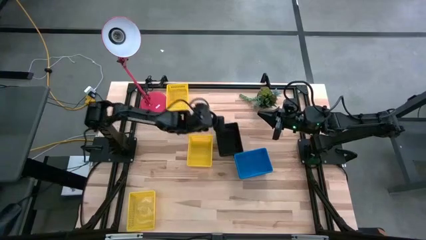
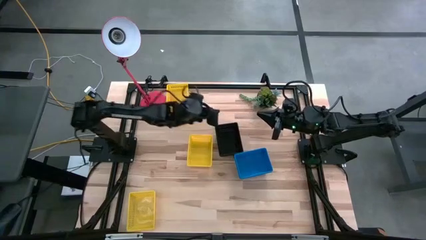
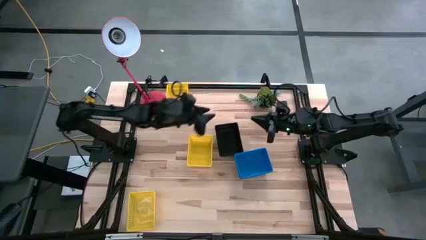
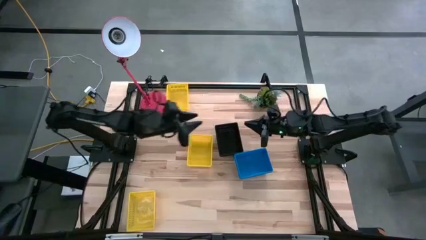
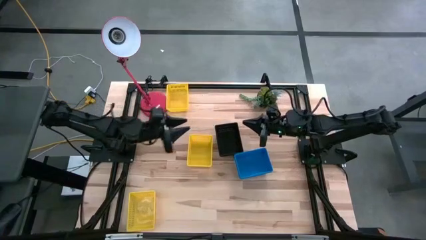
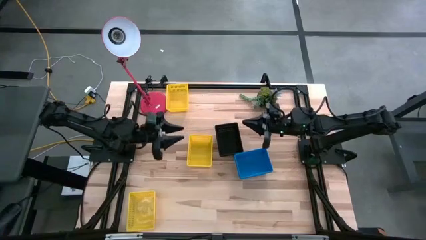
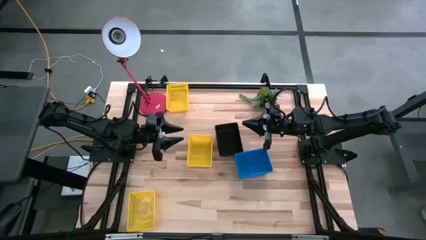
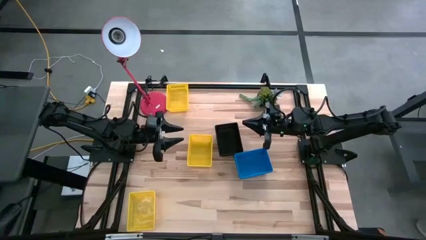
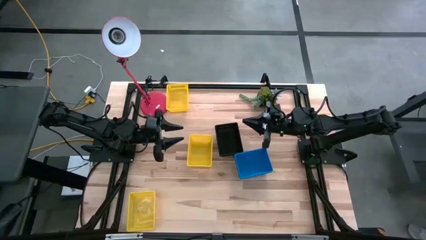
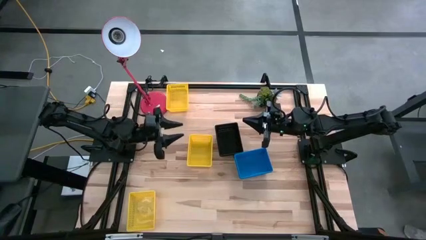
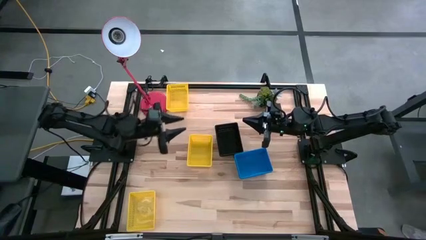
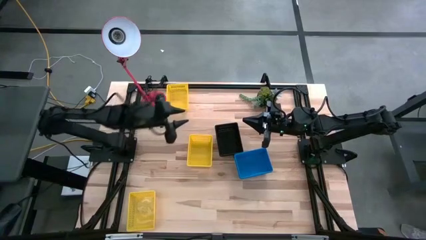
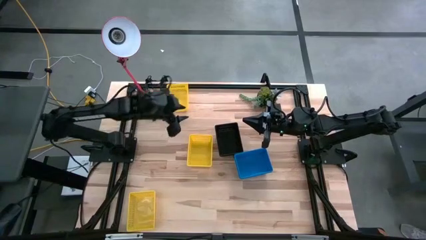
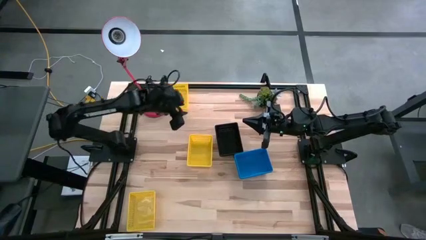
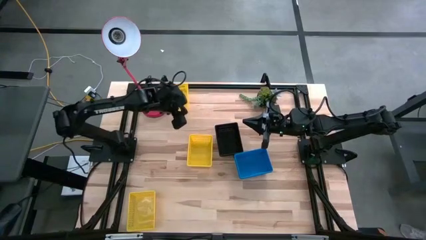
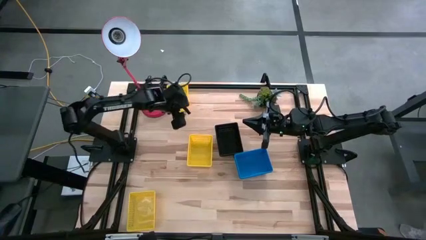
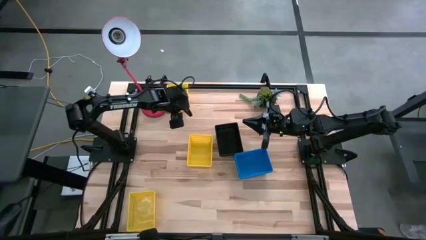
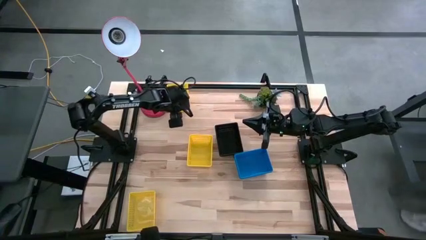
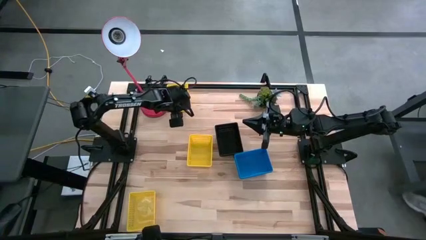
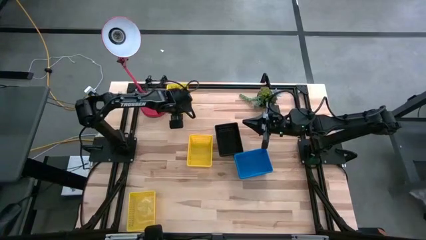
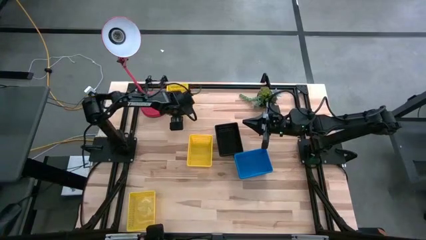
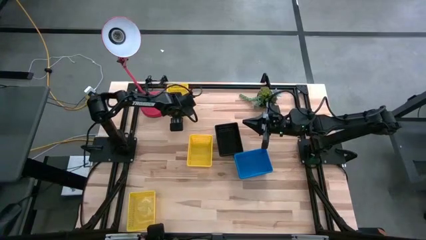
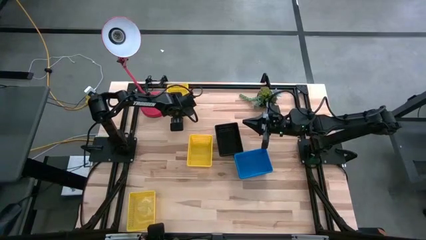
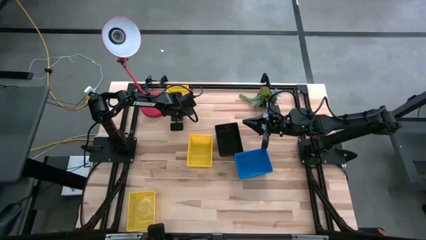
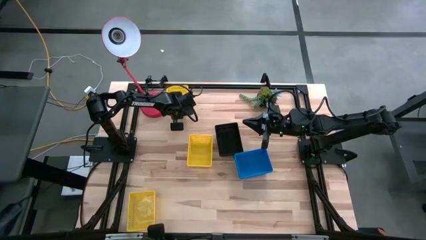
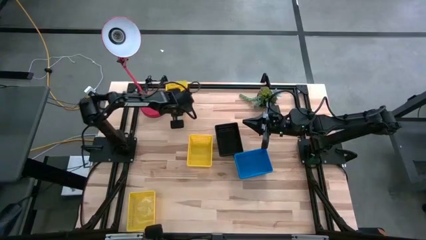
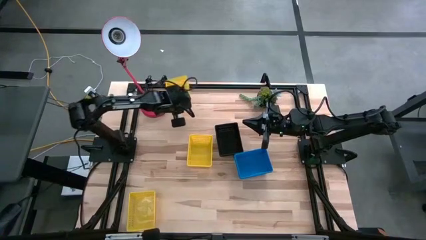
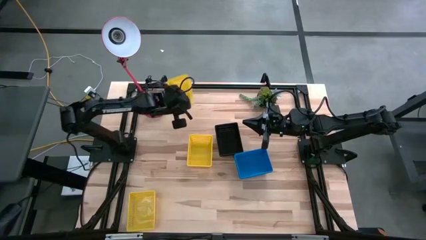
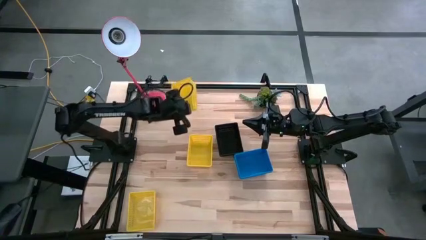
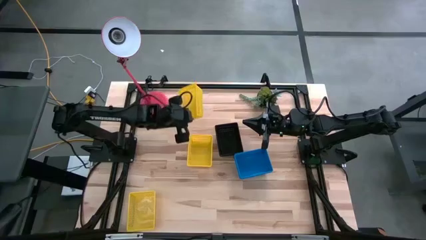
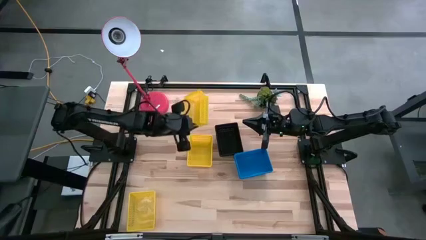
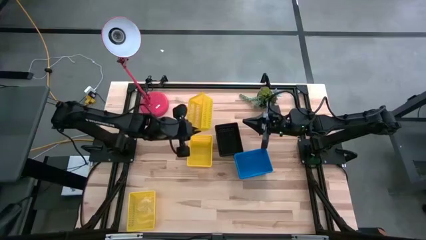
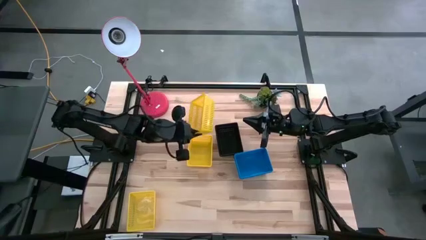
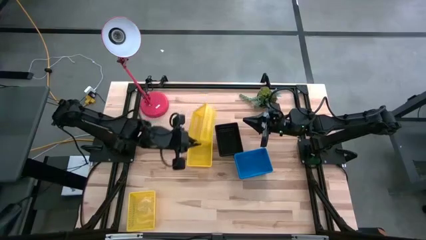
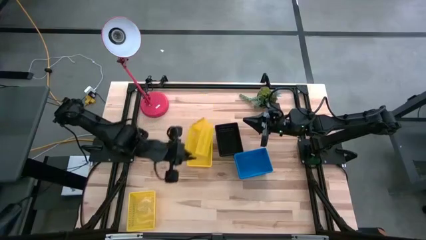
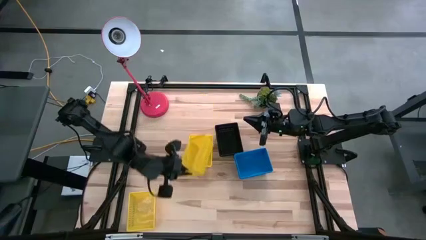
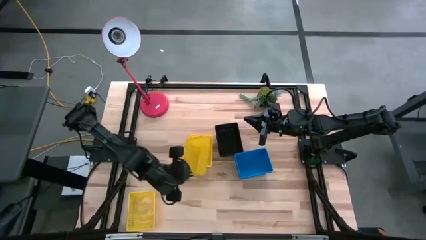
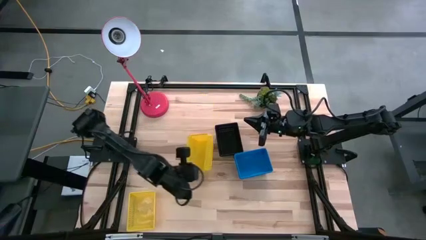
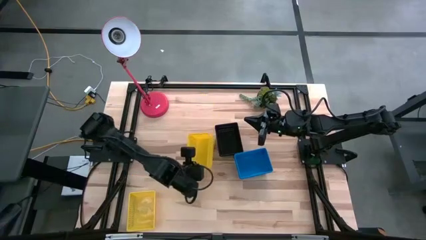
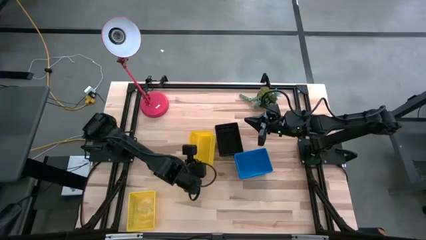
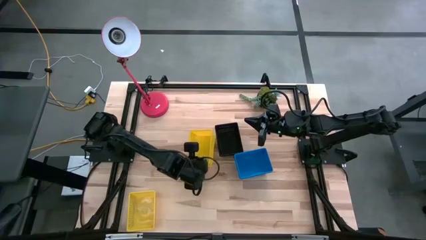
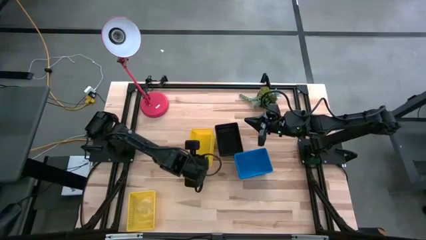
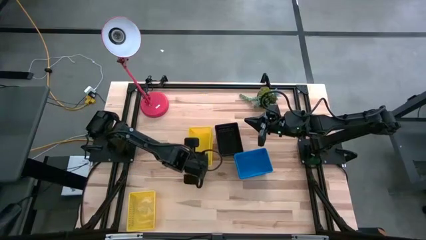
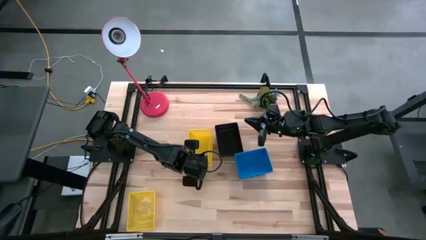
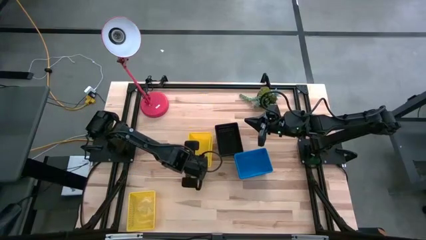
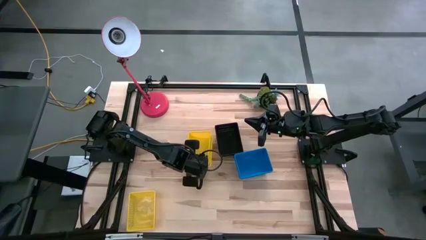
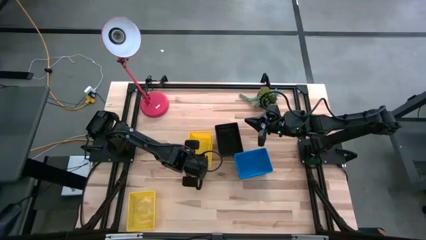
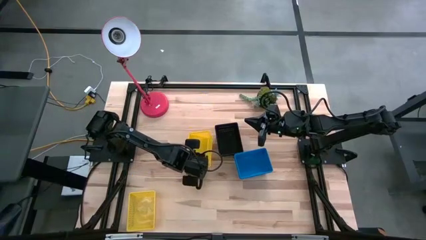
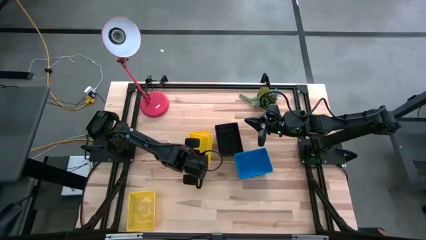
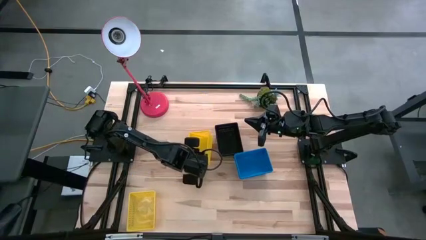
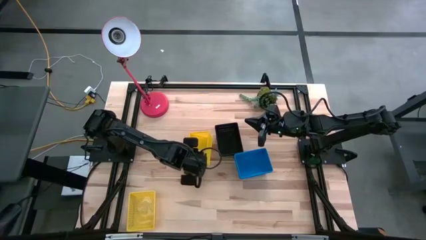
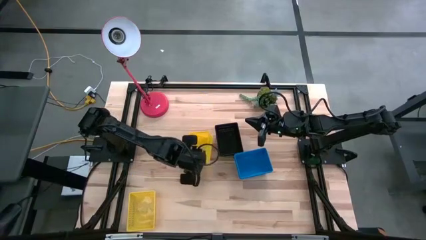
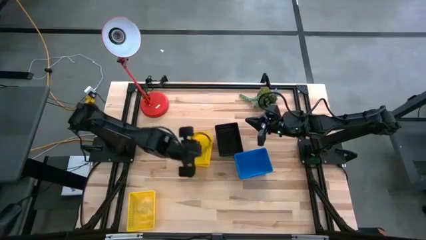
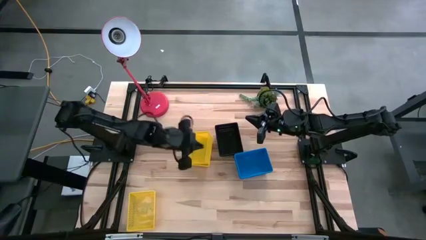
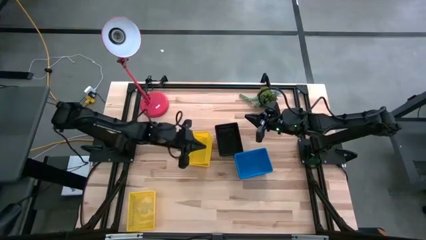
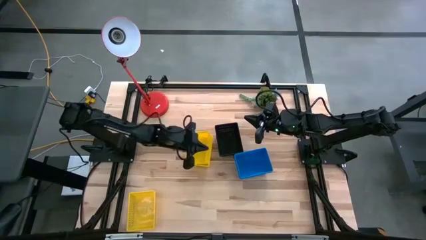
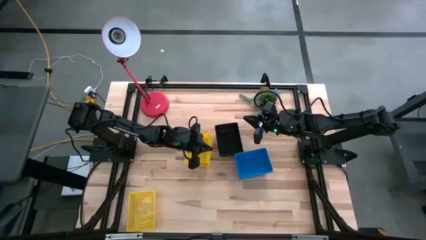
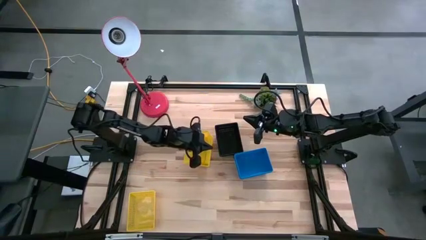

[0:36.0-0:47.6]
Stack the top yellow bin on the middle yellow bin

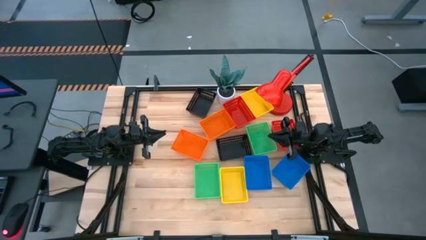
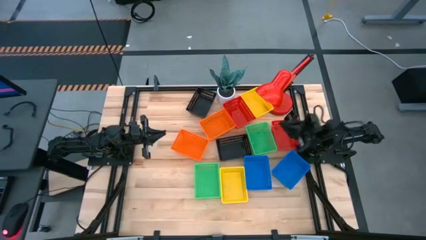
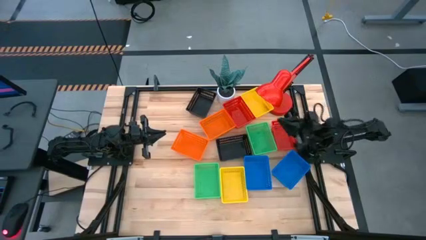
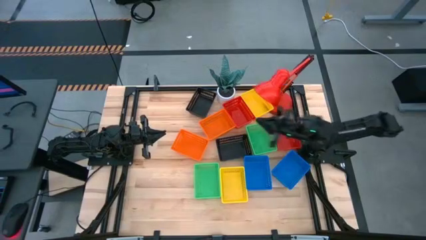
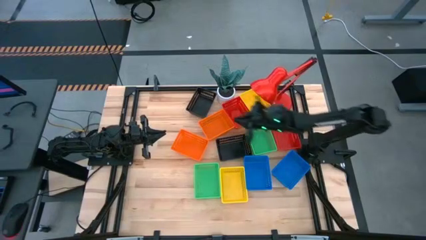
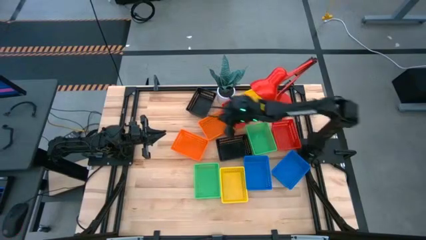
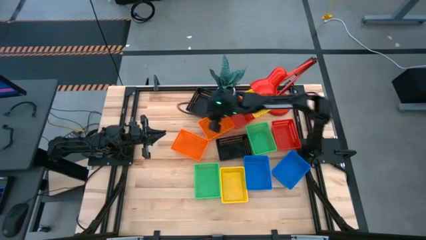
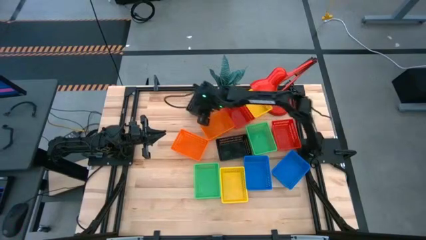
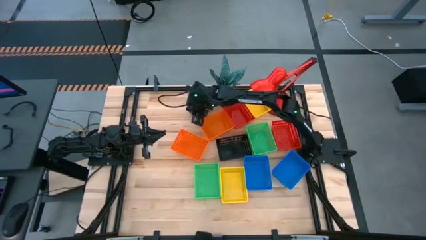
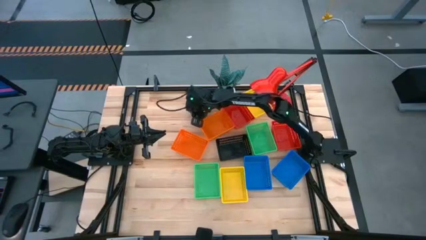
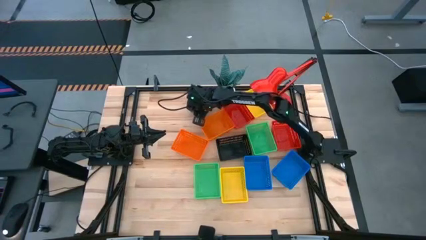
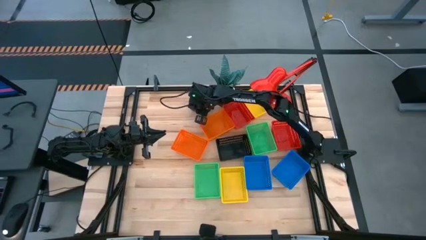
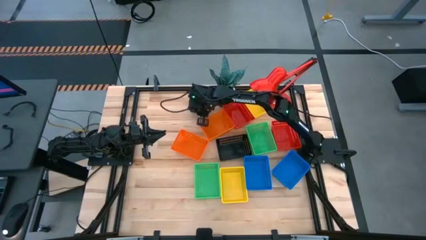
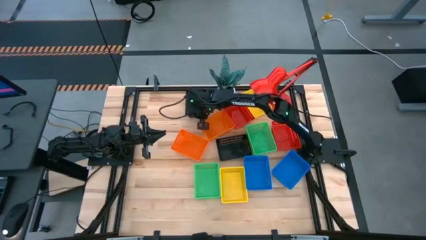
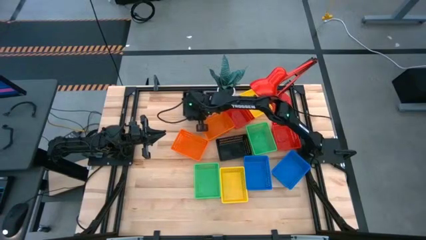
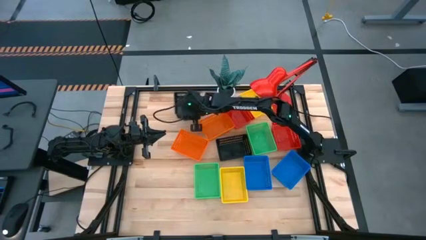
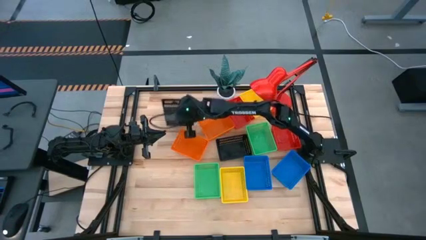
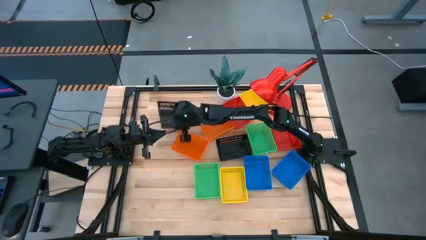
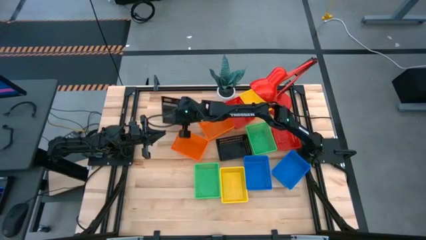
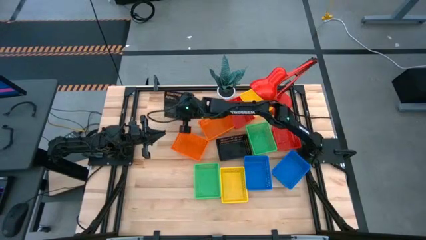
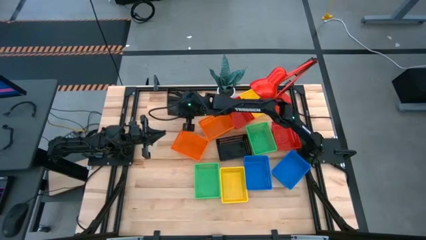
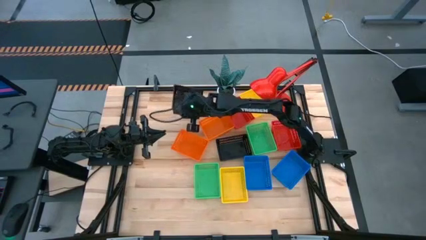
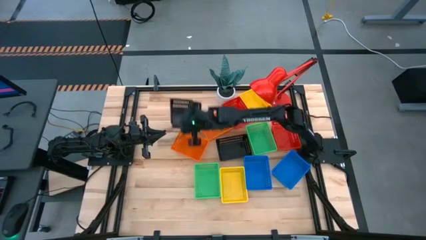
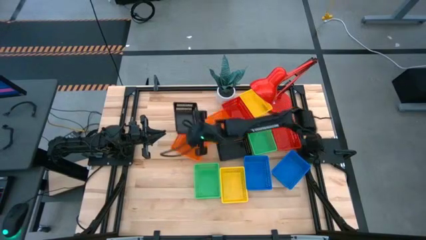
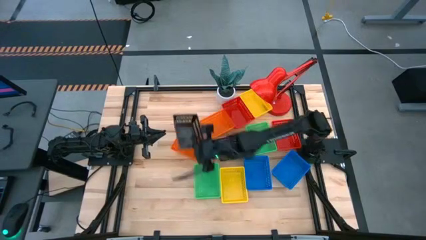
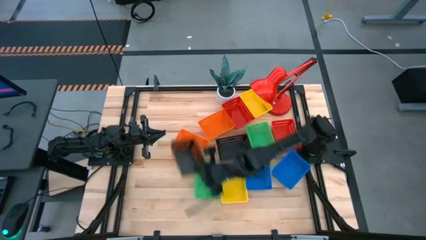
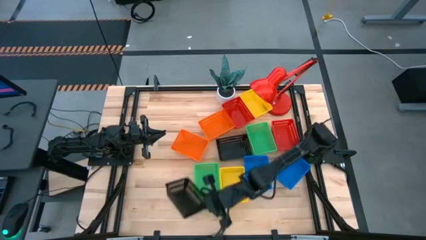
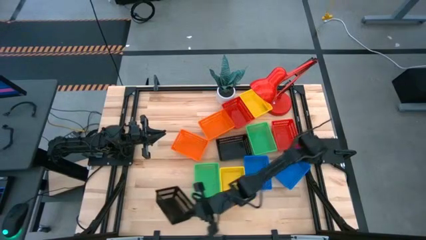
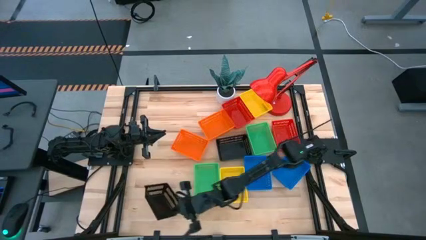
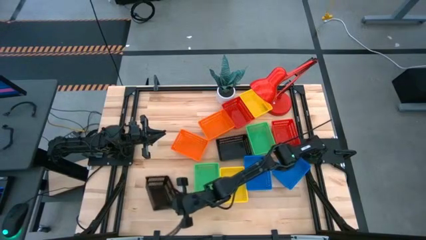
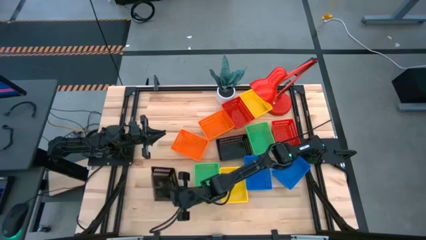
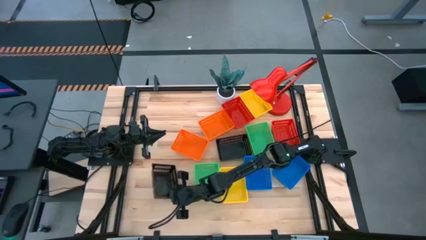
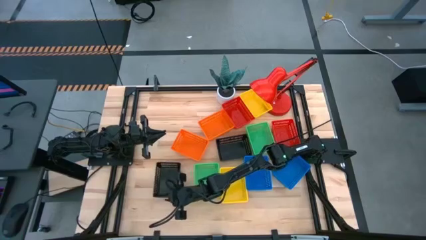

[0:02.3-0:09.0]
Move the top black bin to the bottom left of the table
